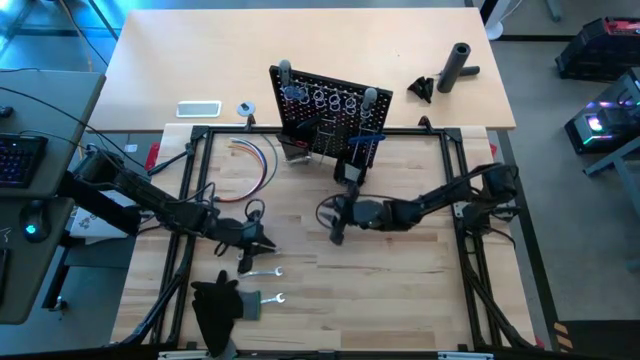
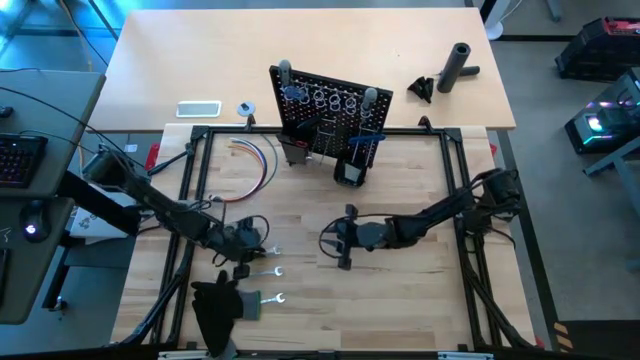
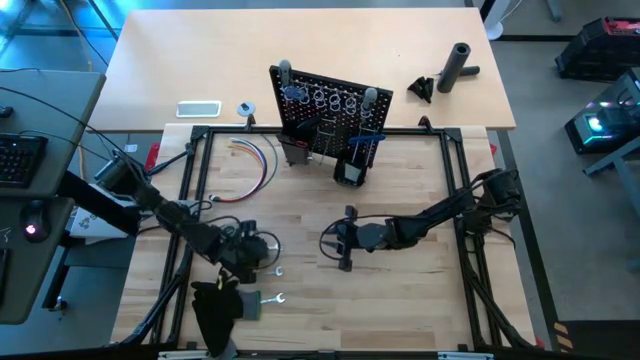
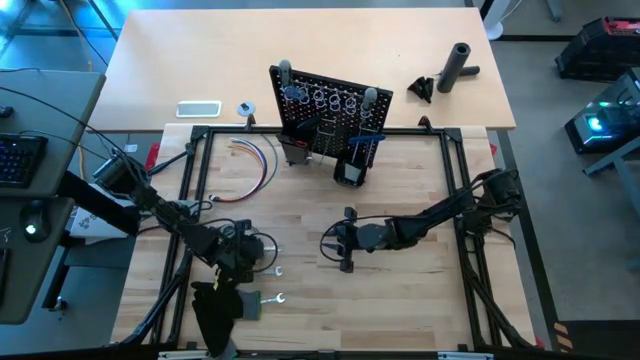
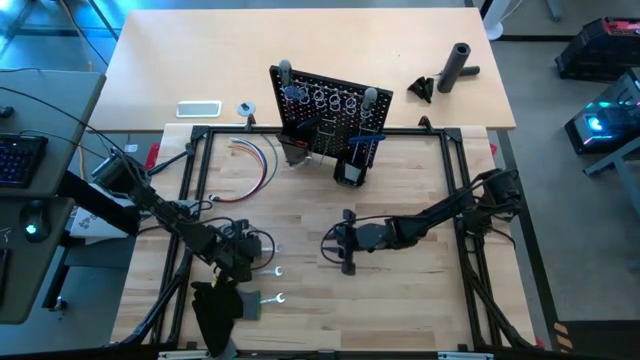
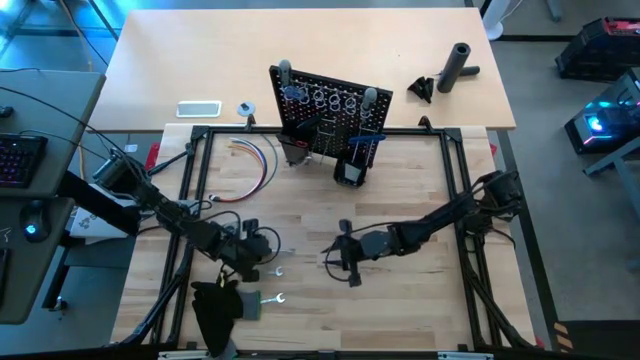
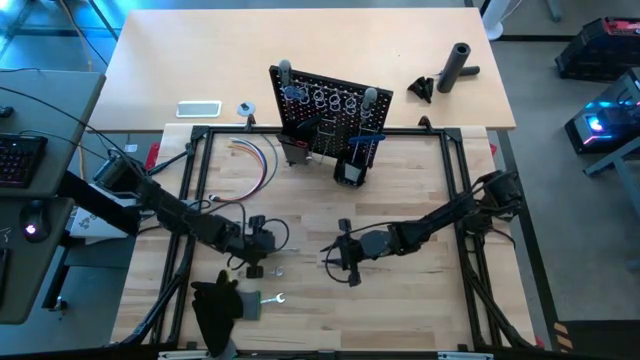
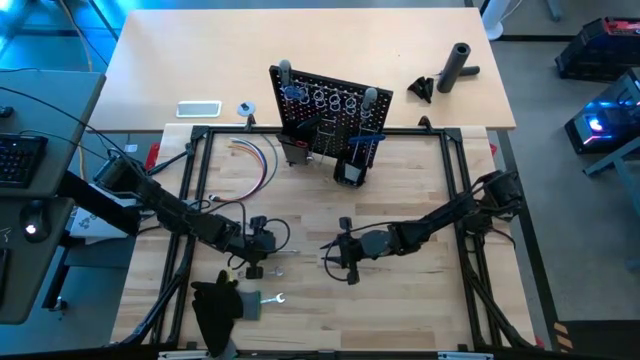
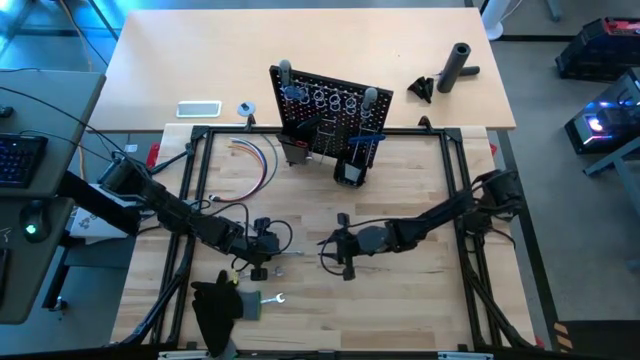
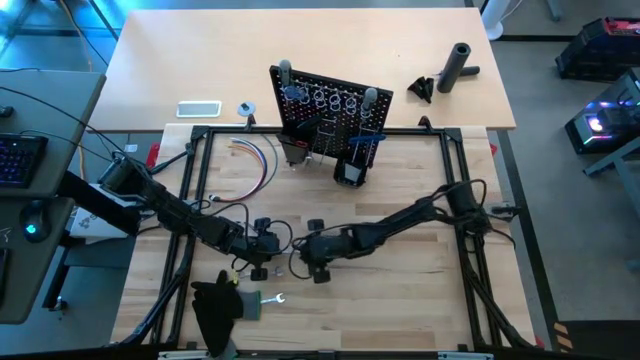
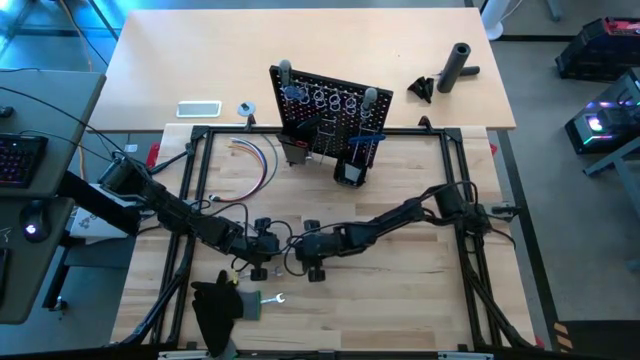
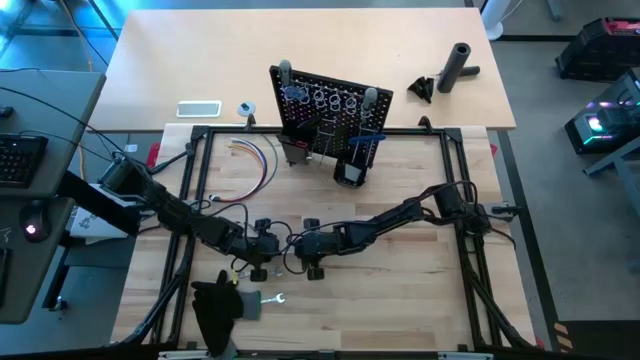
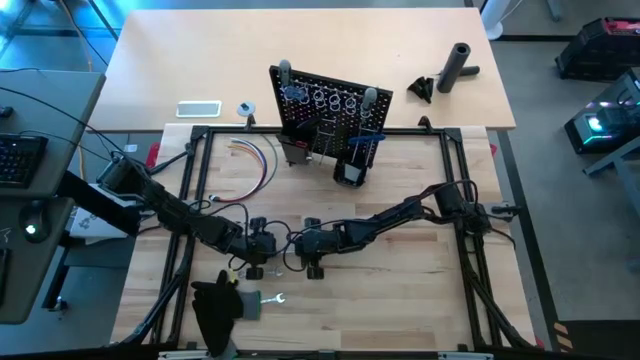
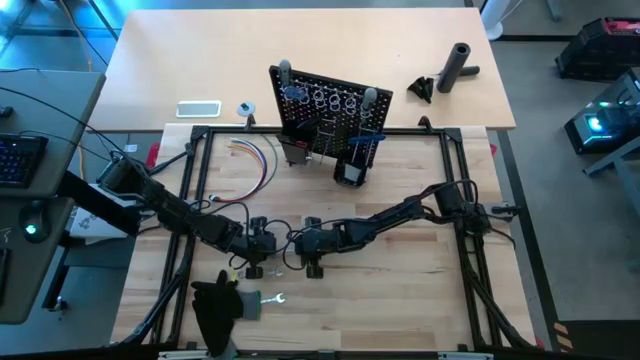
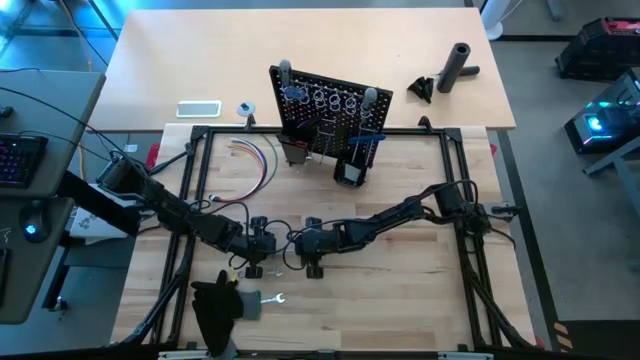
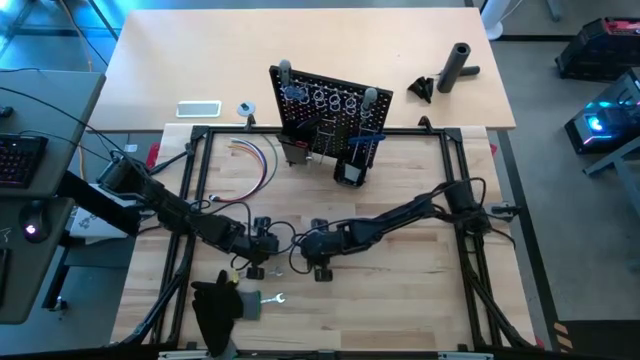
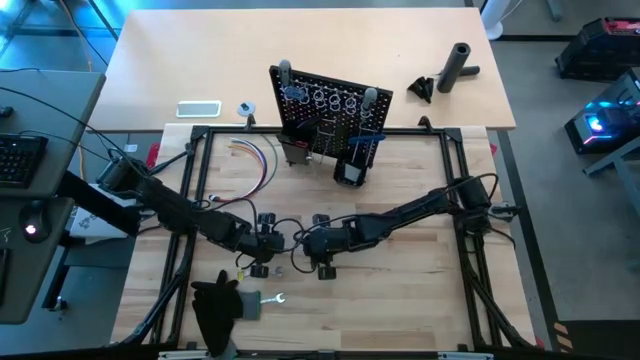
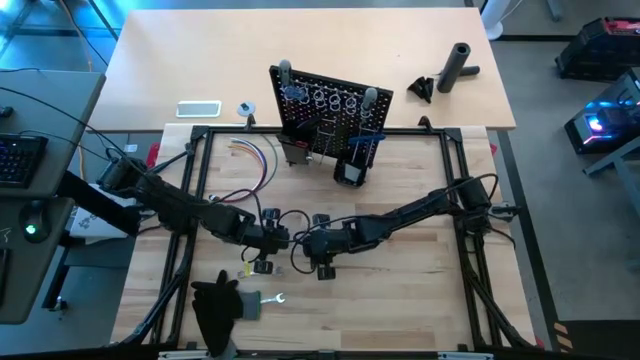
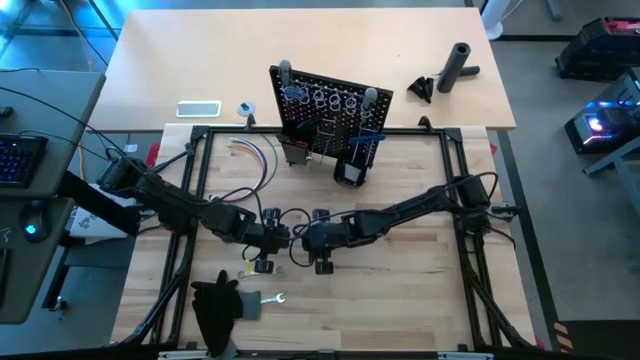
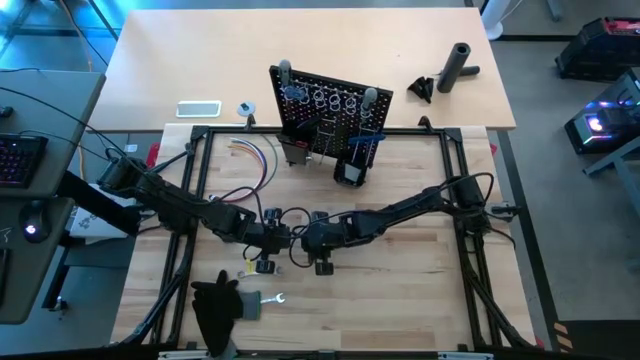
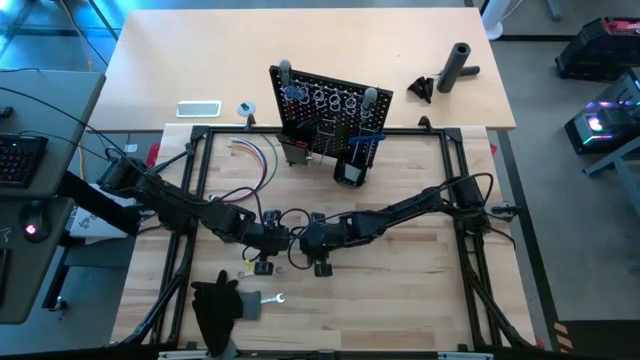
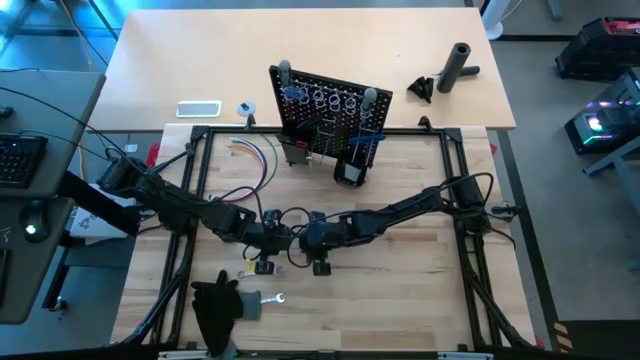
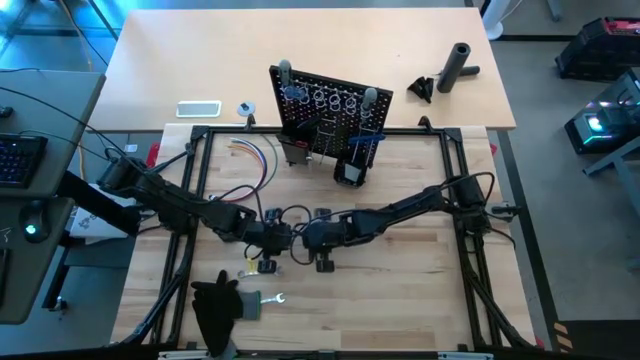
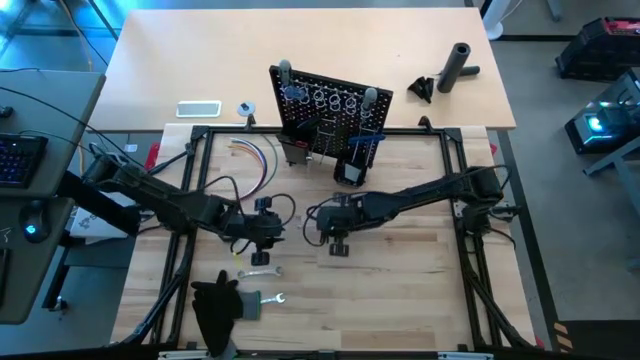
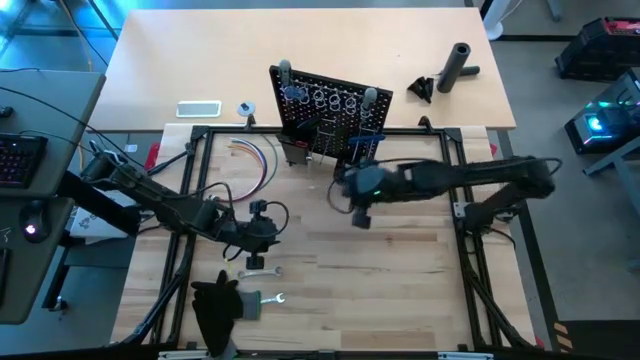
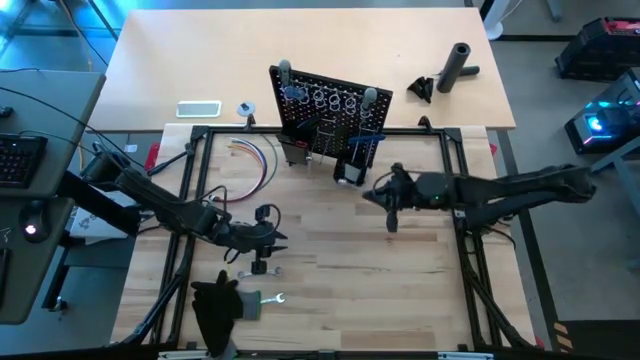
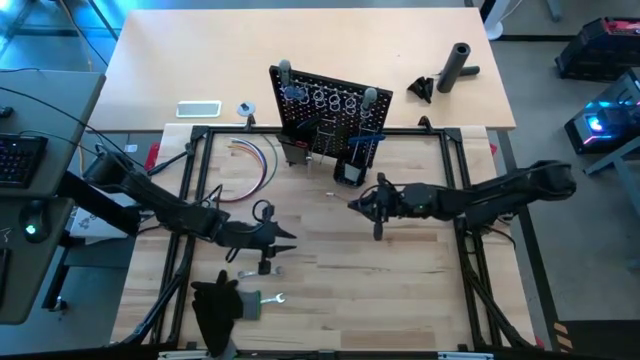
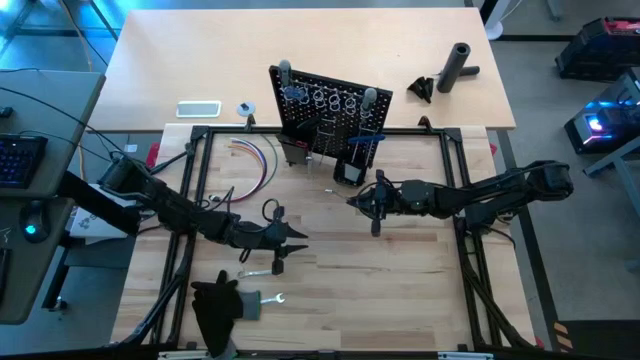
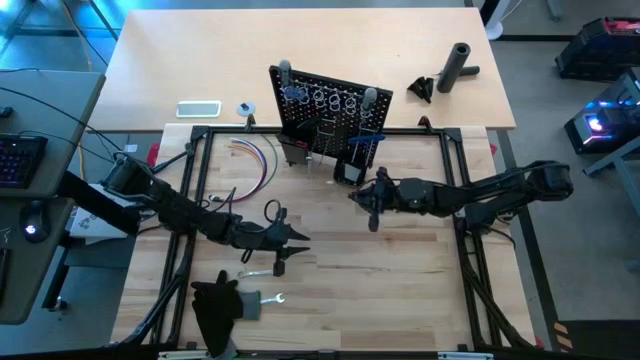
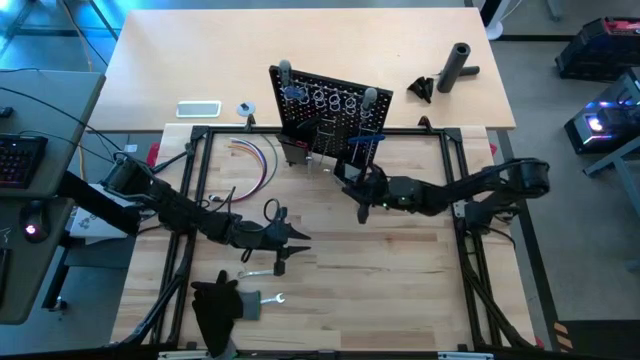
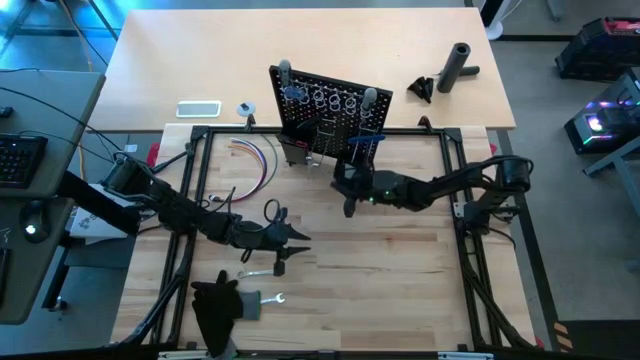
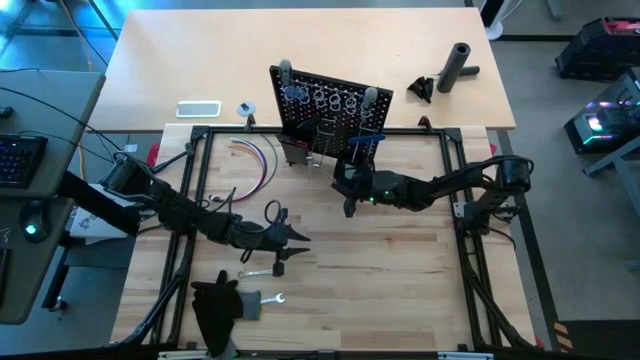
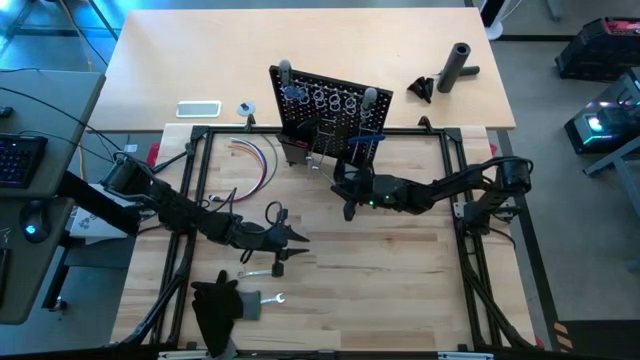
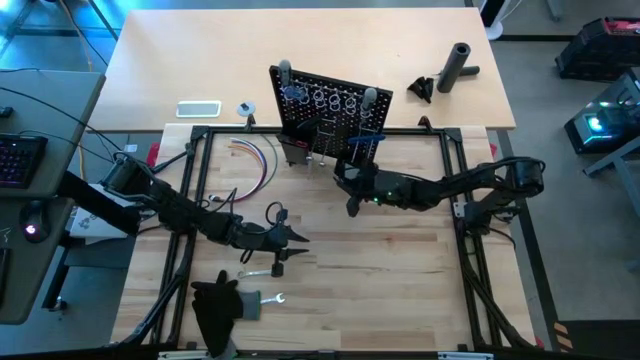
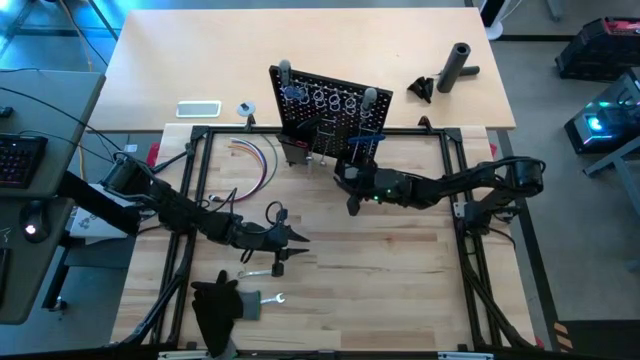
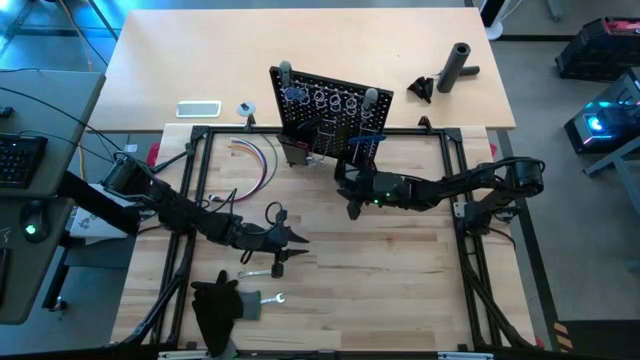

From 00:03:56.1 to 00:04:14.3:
Task: Hang tools onto peg board
Hang the wrench on the black pegboard

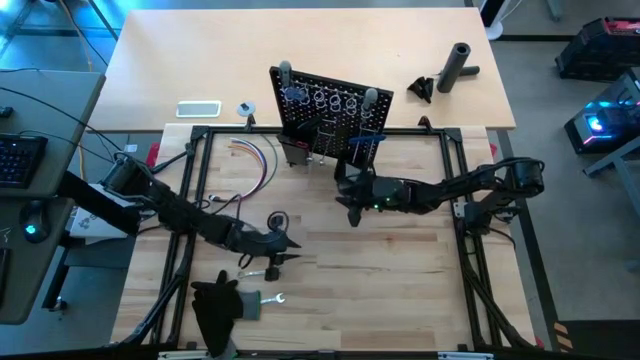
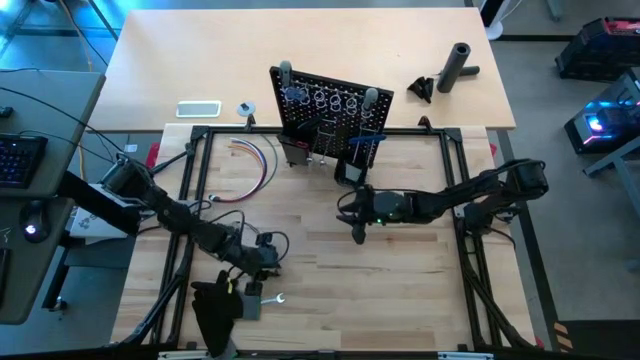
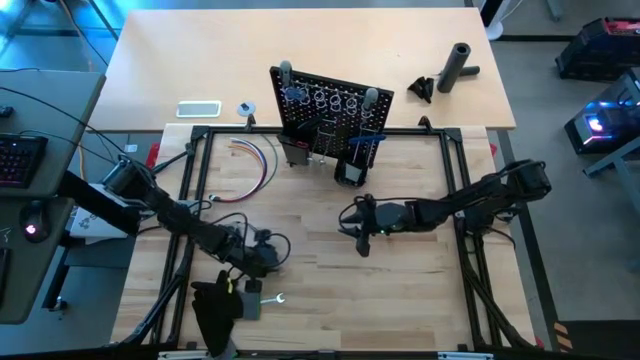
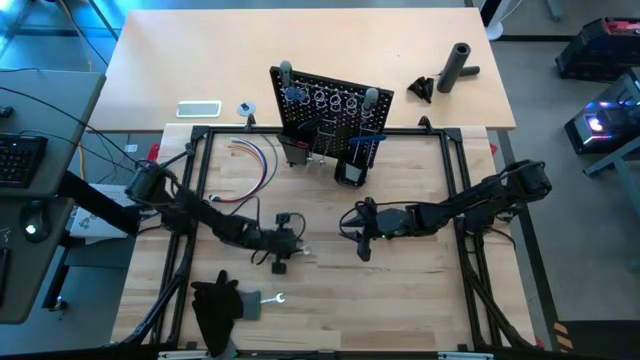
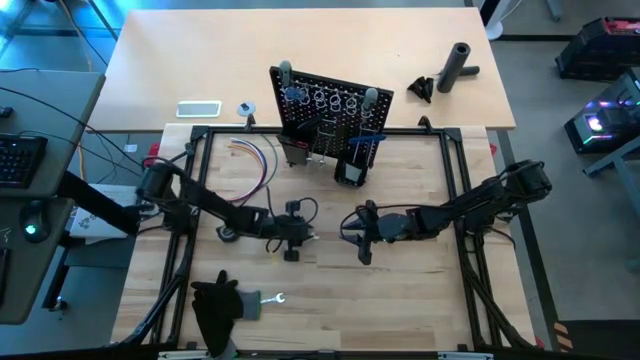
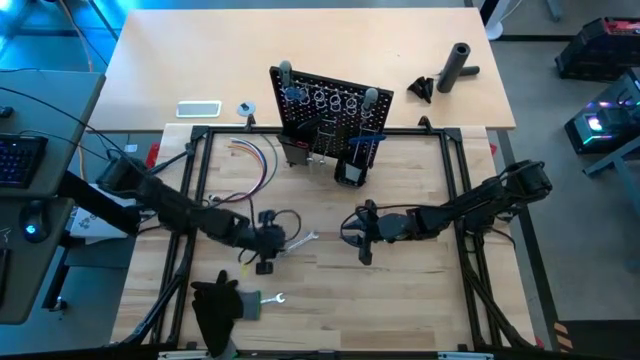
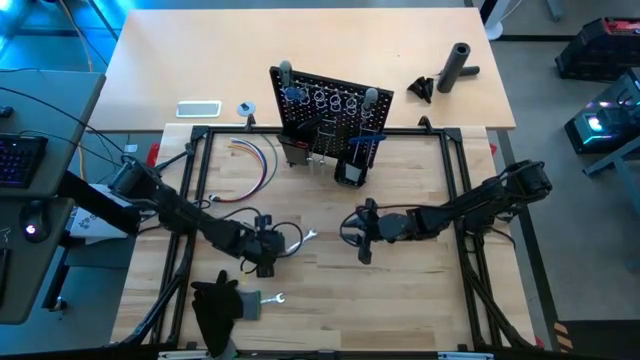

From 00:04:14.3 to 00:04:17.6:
Hang the wrench on the black pegboard
